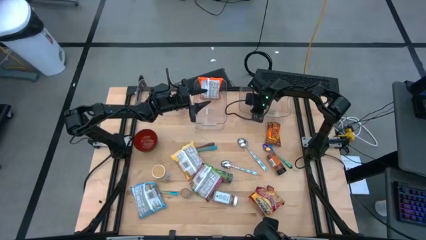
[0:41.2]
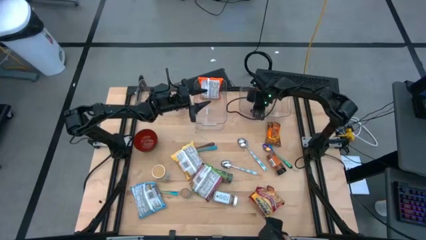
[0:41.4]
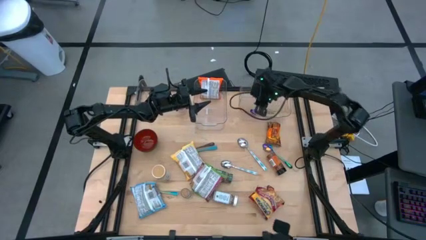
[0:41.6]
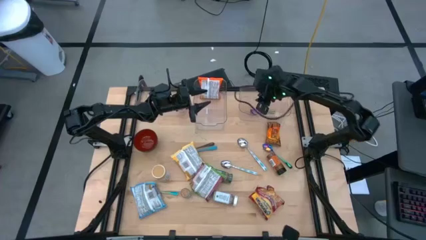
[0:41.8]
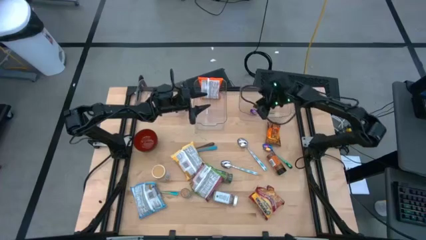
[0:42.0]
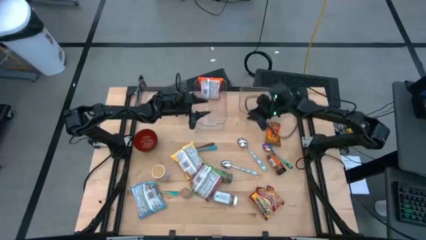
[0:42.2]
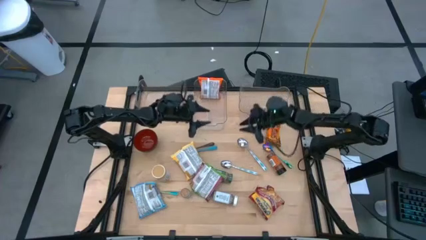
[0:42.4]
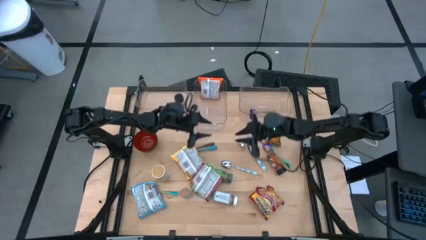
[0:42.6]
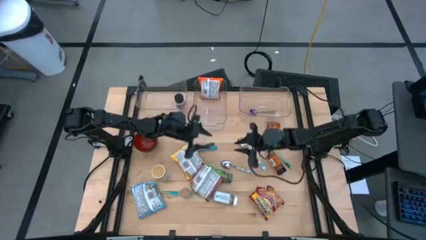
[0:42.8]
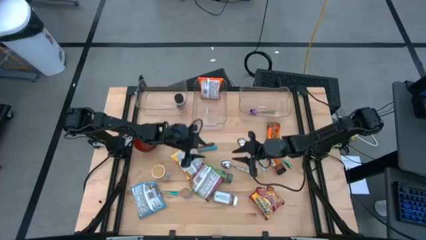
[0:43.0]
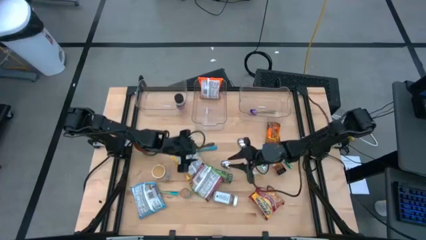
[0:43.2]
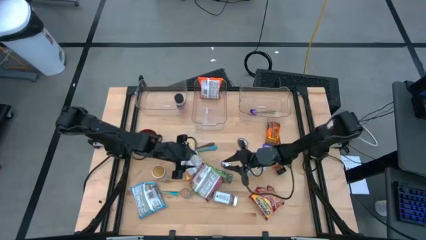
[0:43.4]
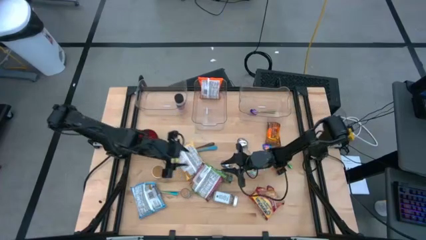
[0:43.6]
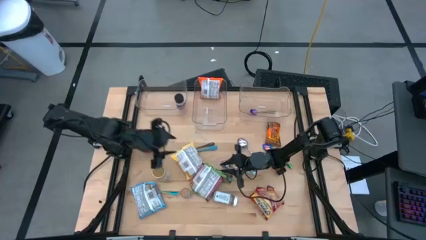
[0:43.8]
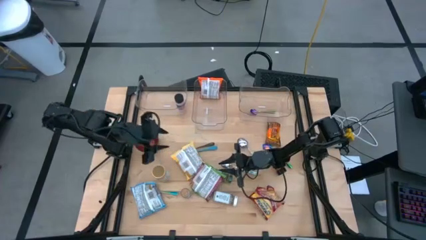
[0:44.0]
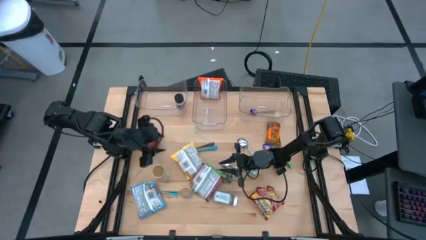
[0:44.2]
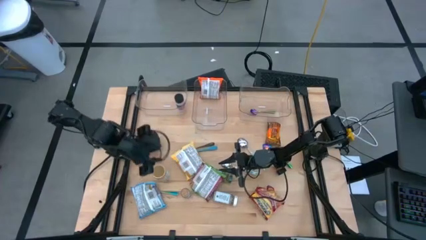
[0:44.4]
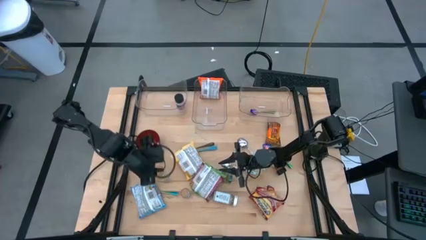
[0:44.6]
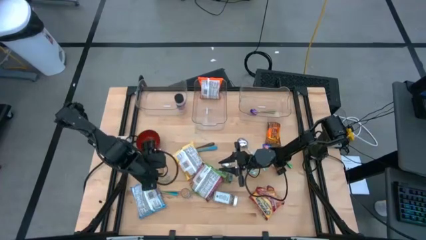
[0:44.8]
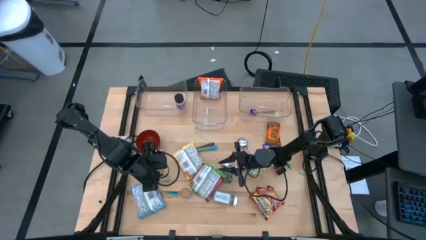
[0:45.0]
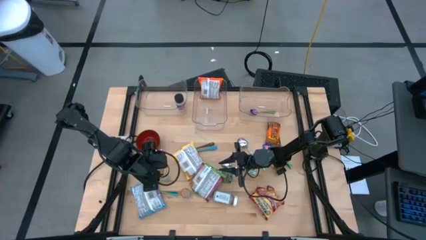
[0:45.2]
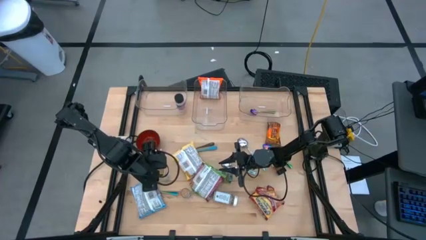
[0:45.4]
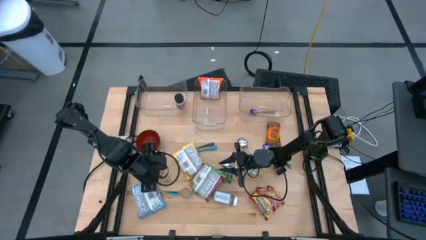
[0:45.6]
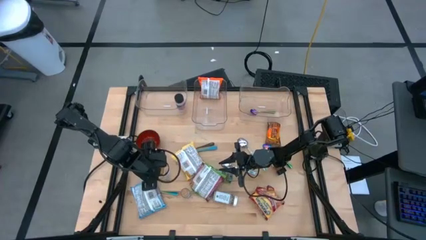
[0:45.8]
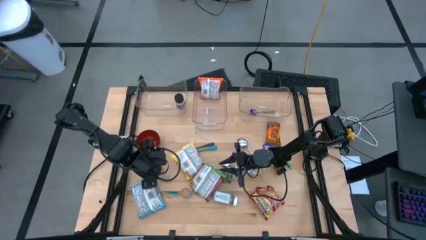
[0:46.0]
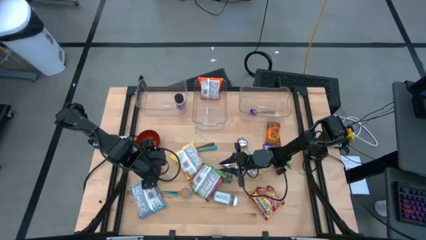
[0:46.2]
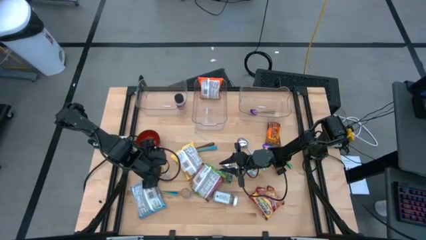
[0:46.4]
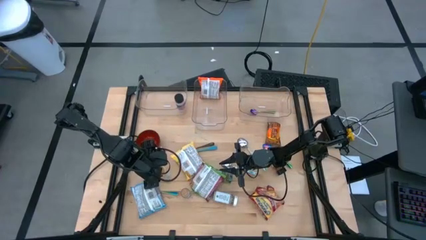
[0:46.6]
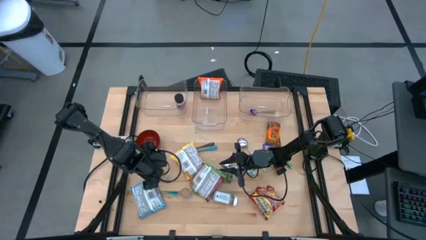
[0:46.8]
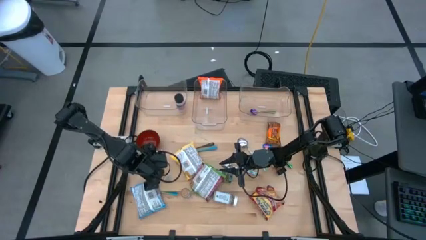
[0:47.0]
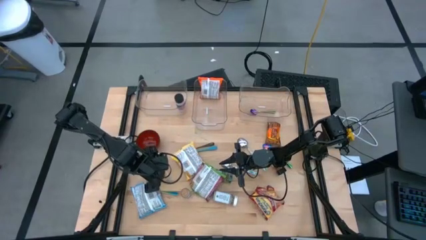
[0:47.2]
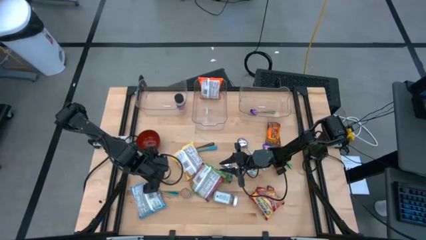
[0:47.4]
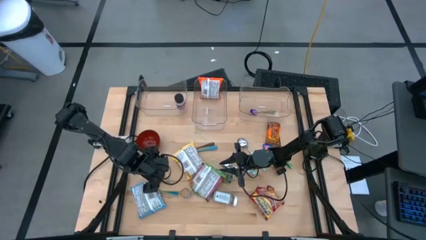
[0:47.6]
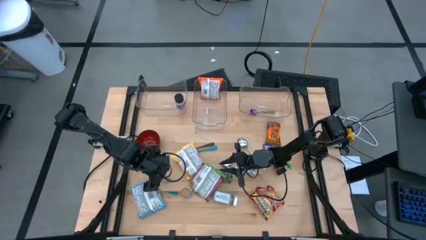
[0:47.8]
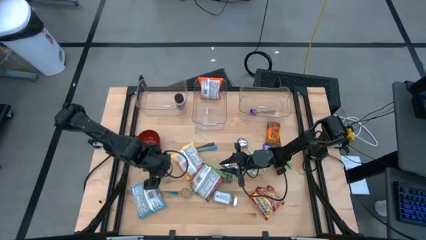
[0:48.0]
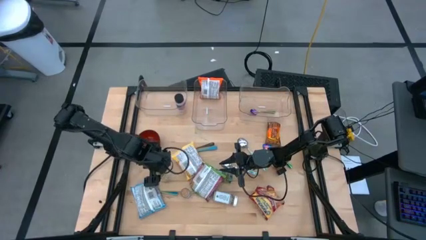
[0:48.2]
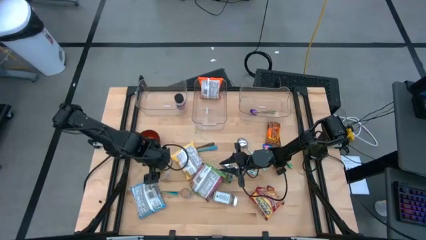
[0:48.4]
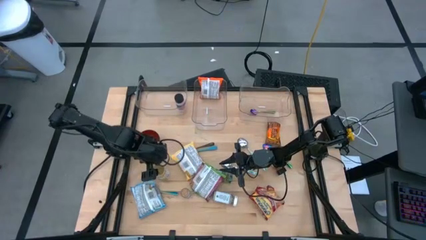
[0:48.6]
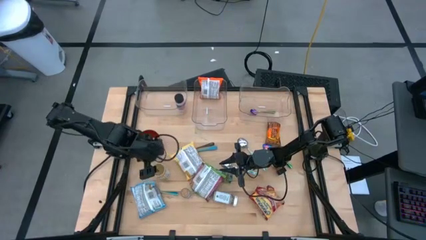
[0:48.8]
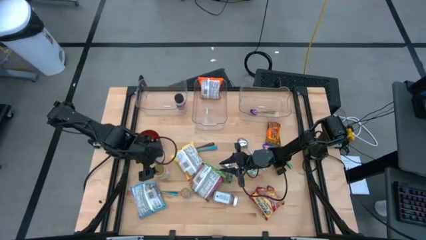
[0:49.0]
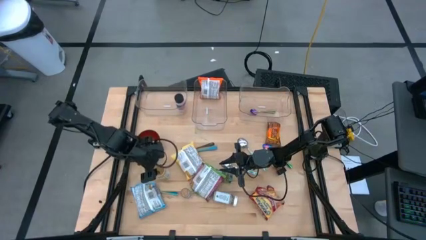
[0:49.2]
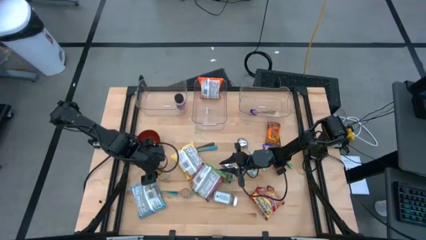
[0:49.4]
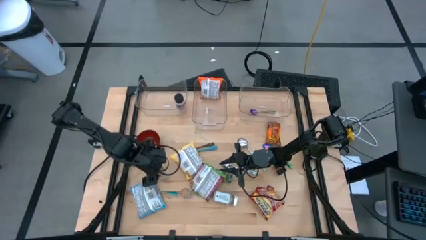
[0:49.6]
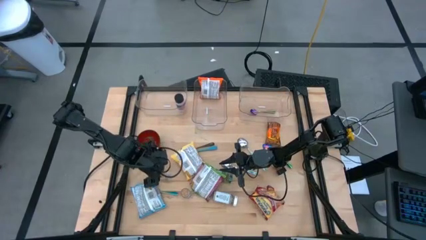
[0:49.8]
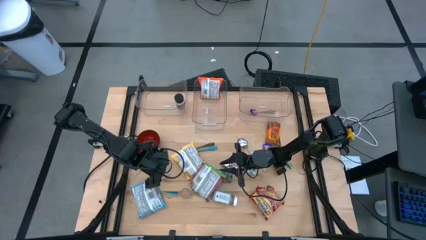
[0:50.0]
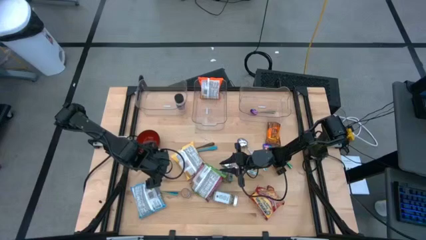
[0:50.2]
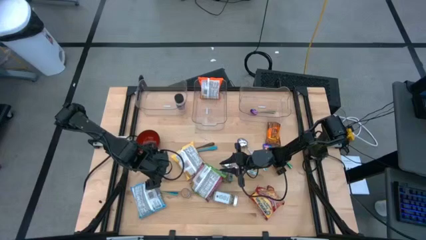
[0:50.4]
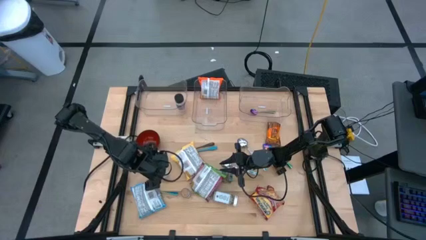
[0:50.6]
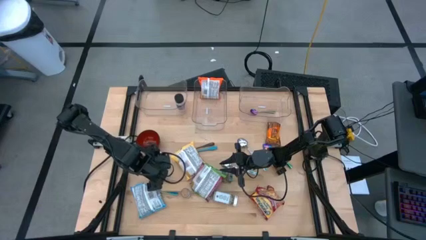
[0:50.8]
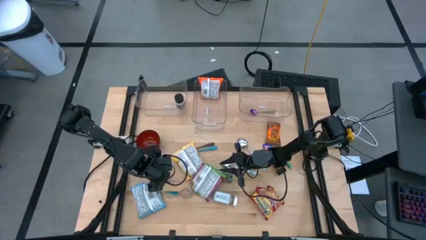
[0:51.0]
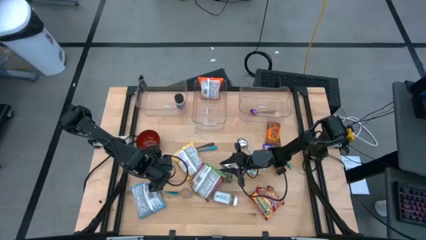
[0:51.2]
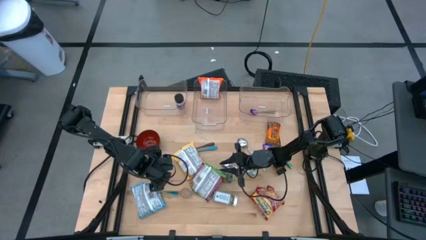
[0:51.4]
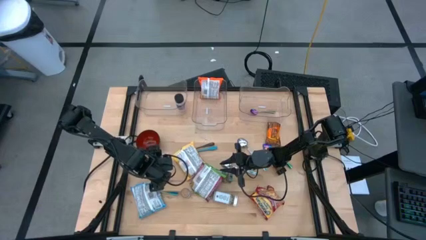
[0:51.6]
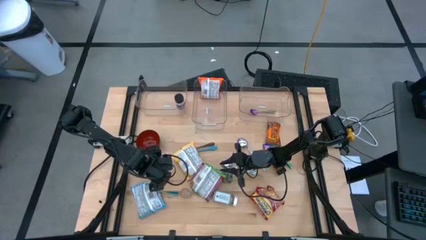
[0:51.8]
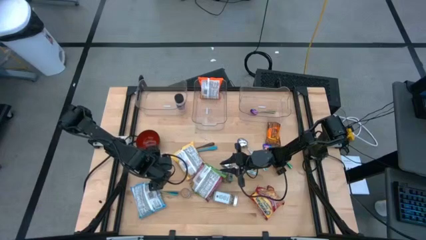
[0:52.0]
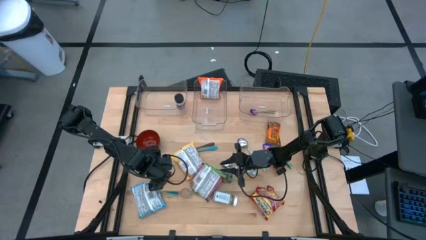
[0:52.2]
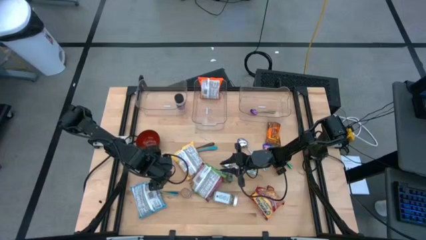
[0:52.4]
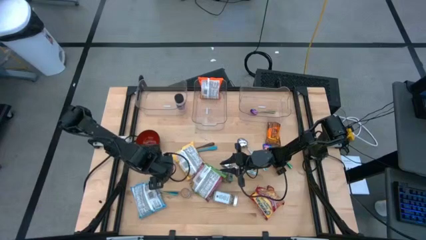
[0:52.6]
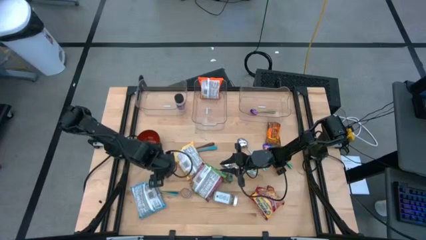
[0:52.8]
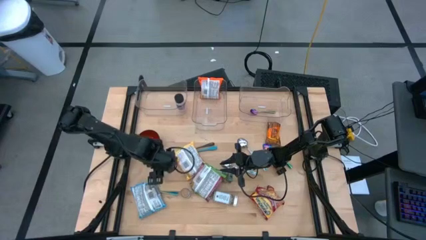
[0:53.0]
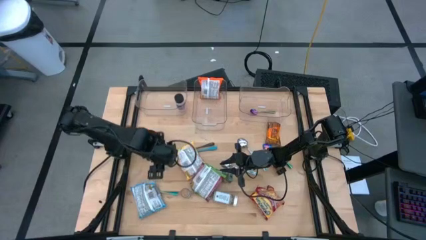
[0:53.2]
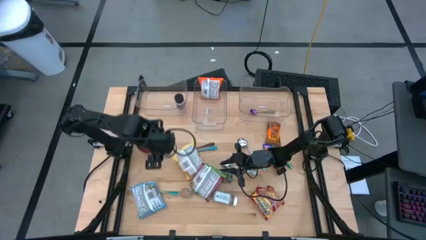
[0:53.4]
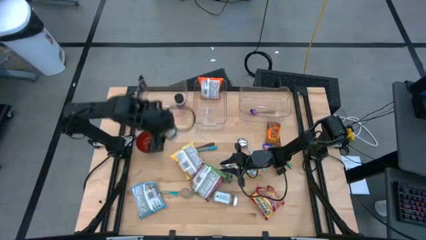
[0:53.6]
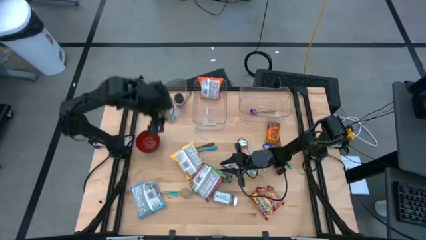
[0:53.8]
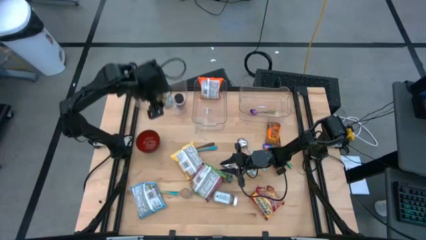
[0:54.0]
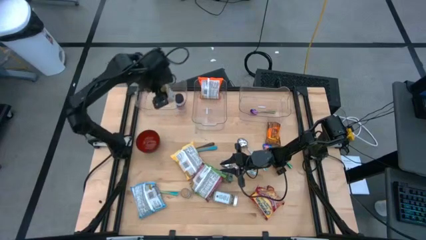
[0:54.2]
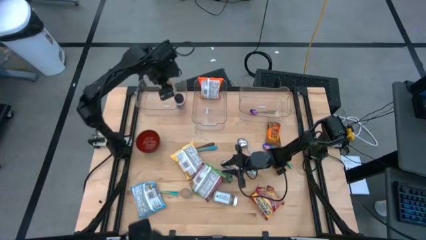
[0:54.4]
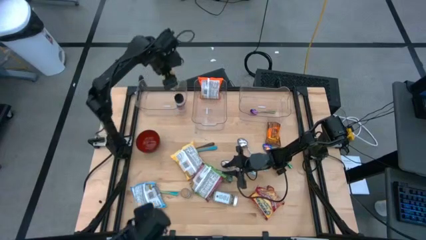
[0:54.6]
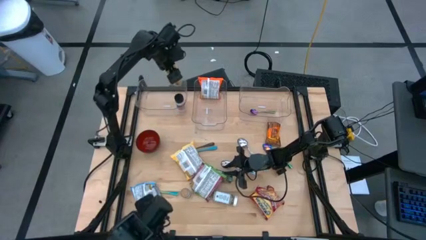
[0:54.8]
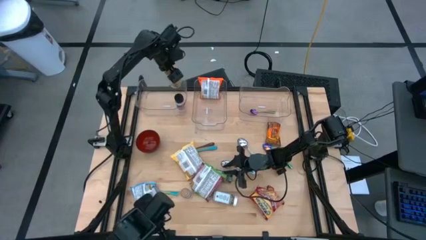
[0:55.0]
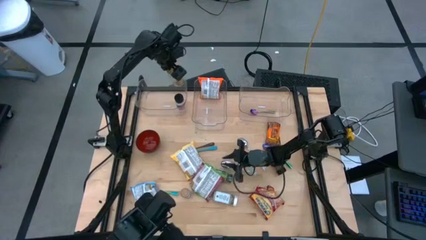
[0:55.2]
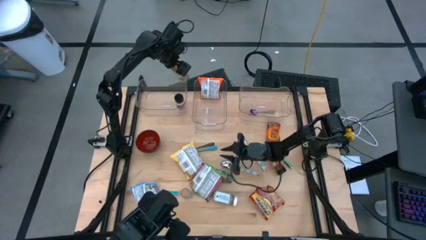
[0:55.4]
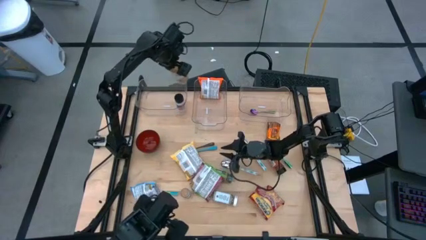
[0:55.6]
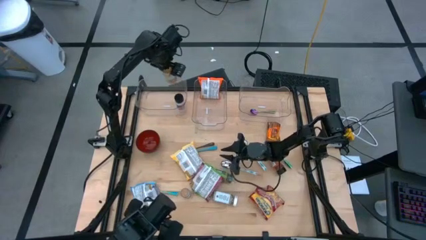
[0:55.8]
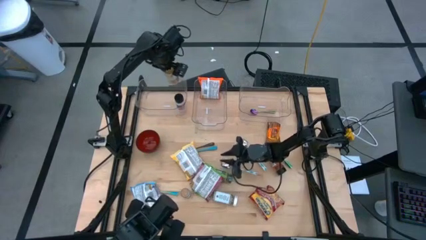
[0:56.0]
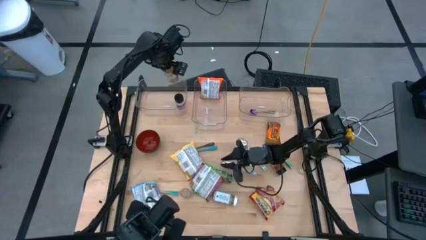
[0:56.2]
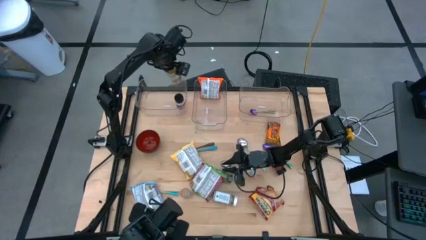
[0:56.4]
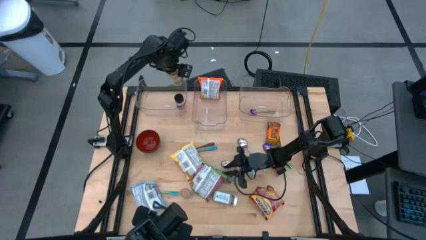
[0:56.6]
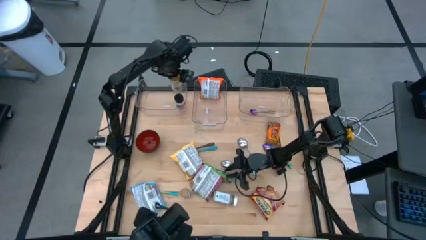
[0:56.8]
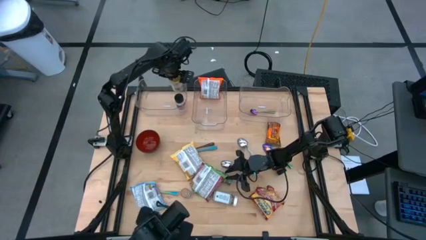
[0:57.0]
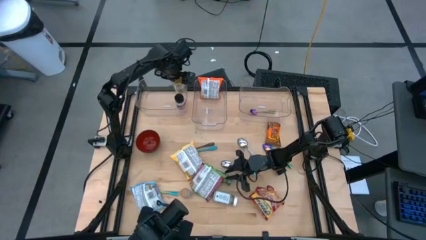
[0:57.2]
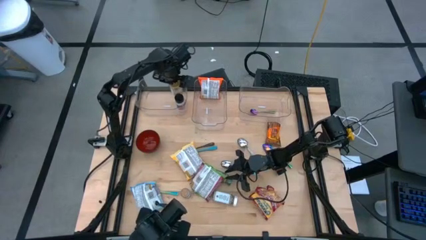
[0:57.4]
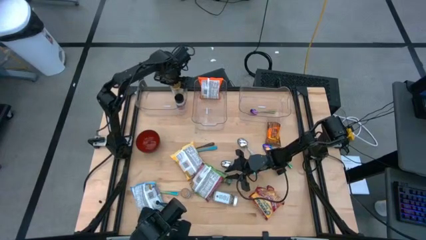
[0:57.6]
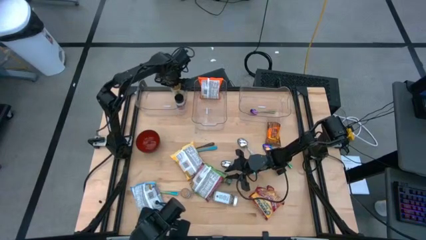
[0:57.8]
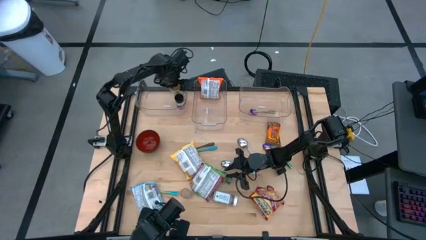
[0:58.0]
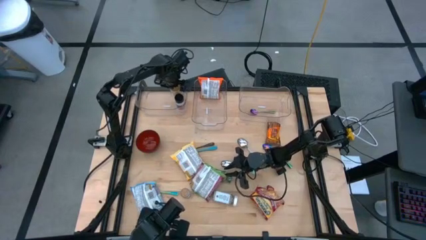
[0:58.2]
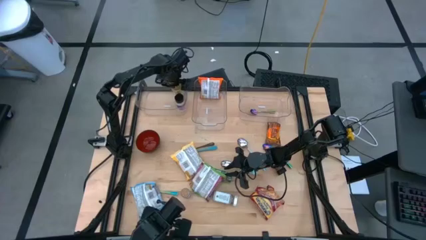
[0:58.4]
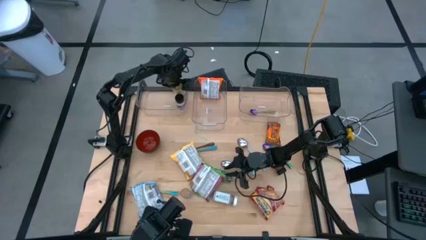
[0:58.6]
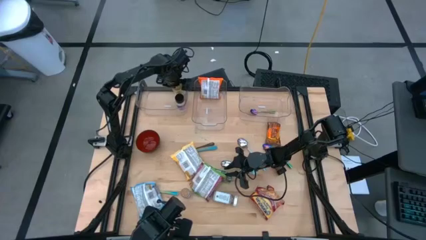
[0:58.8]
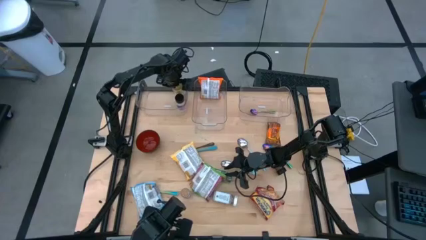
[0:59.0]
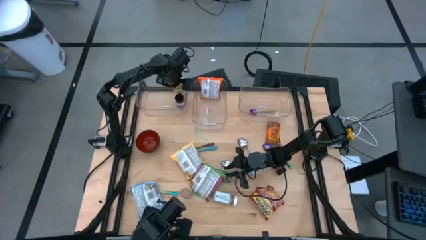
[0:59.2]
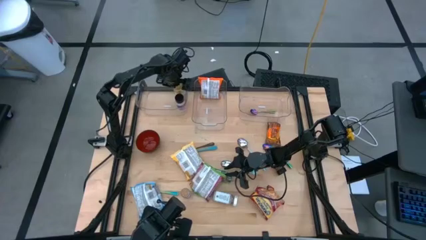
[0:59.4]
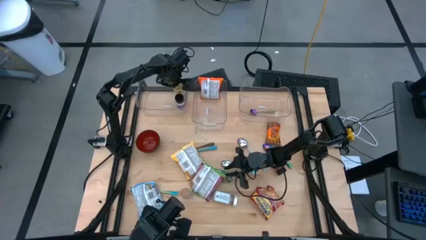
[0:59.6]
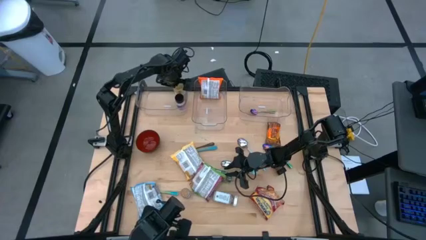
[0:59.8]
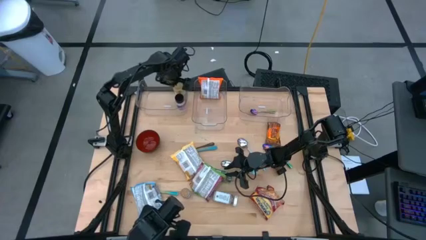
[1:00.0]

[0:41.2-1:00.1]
Task: Pick & Place Food Item
Put the golden seasoning bottle into the left transparent bin
